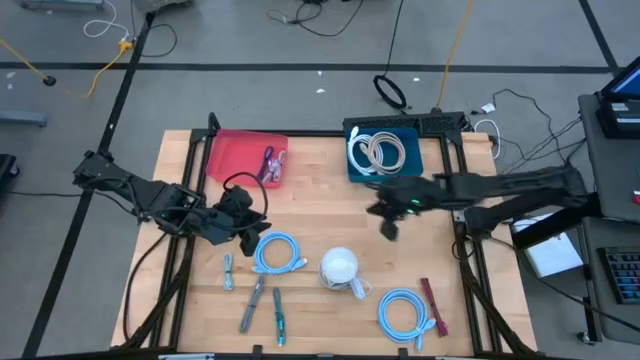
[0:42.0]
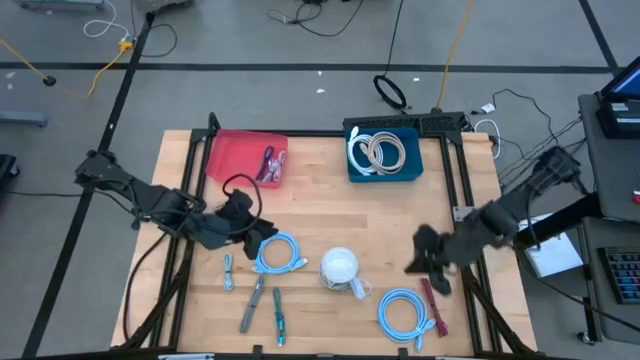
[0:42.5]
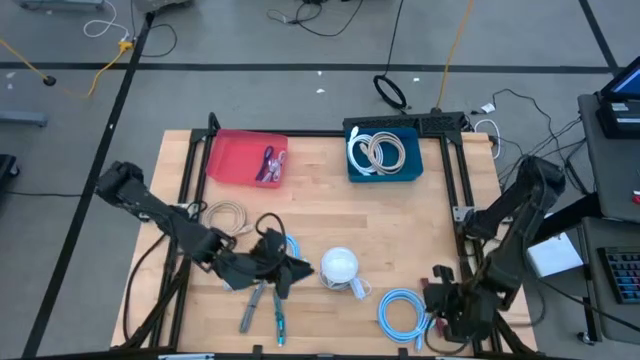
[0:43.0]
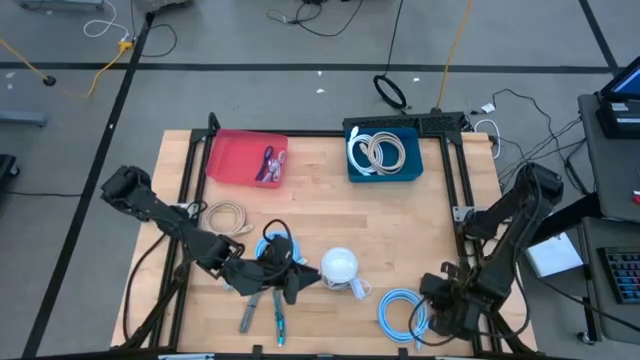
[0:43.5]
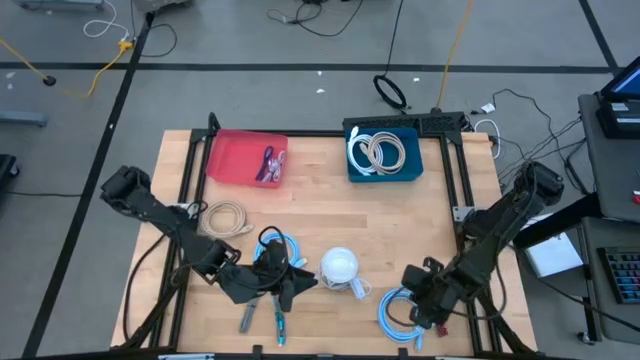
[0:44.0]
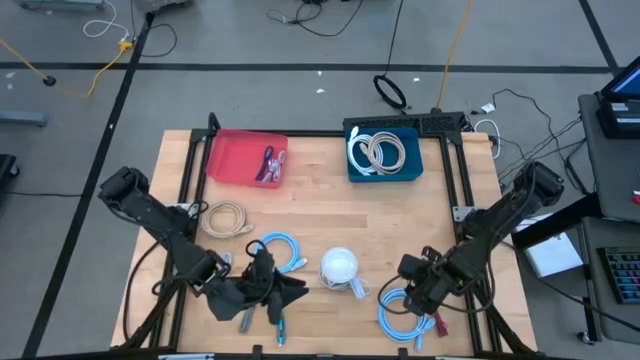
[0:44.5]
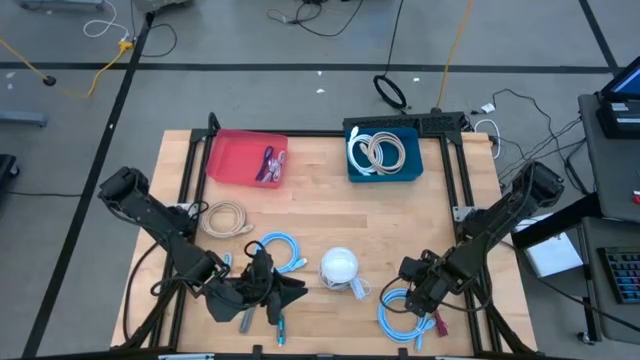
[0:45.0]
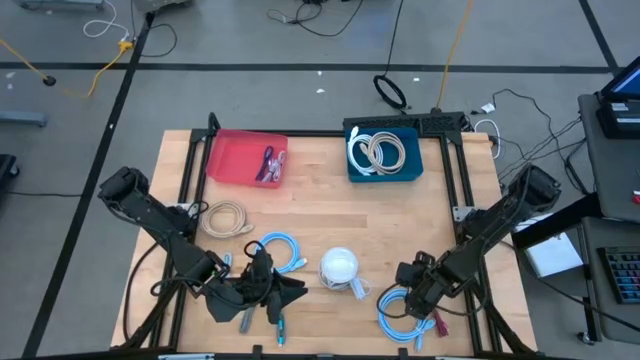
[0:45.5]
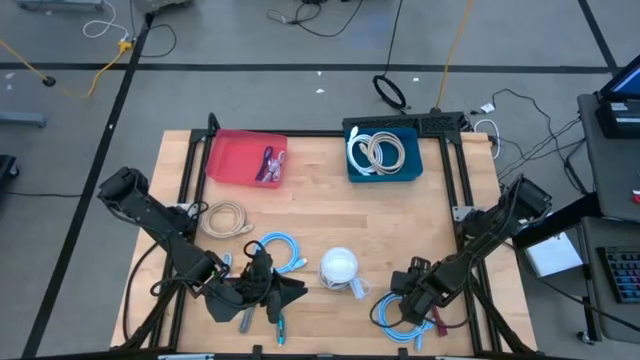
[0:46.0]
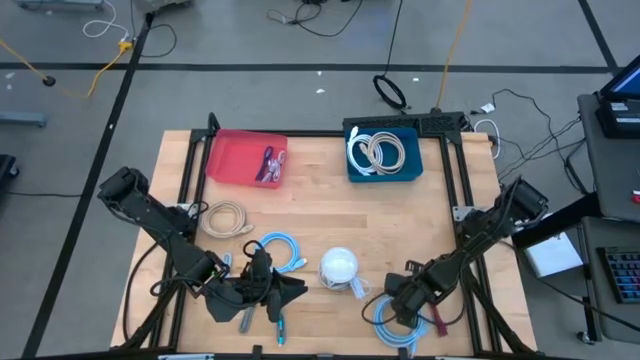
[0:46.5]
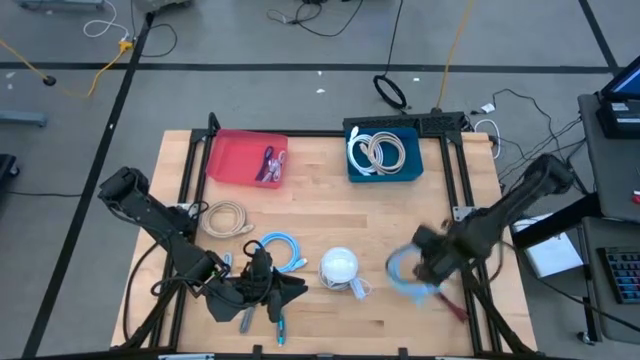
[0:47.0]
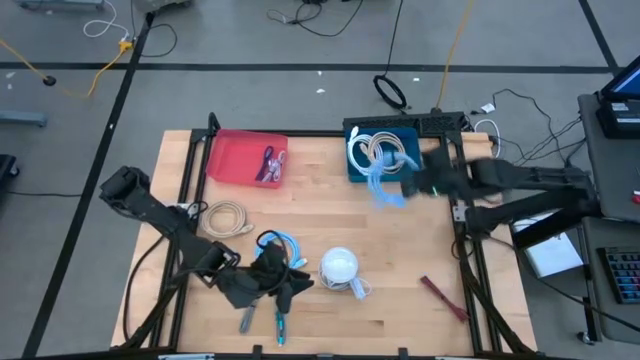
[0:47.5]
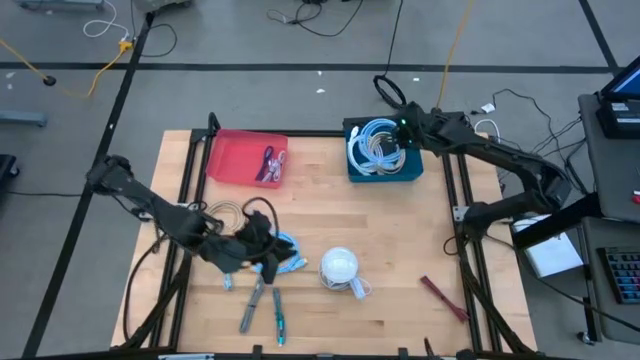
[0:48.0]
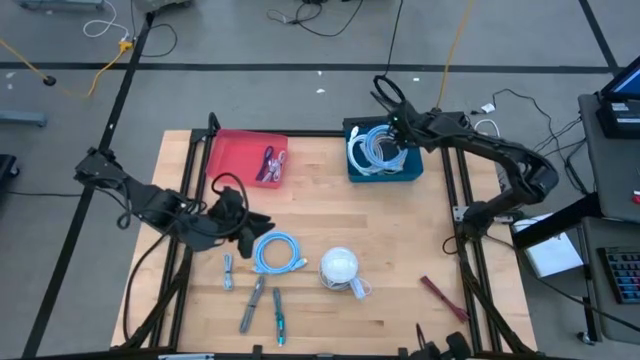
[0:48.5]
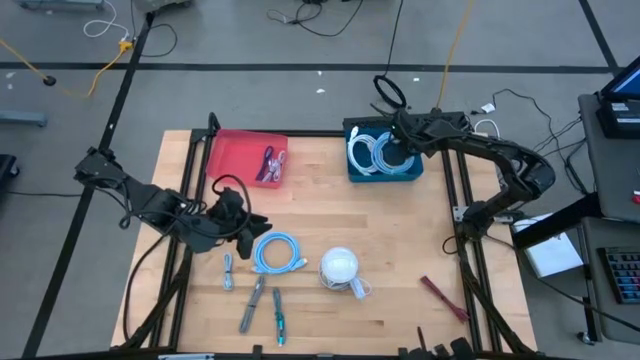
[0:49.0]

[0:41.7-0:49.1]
Task: Pick & Place USB Port
Put the right light blue USB cable into the blue bin

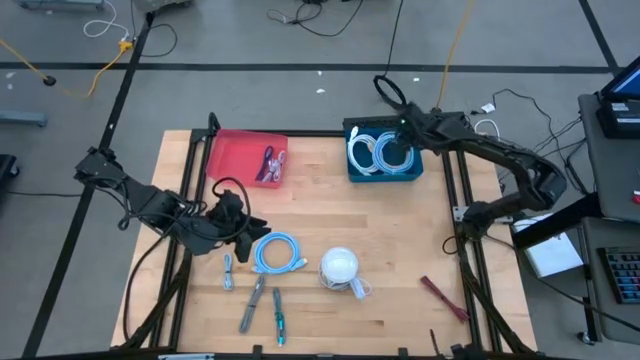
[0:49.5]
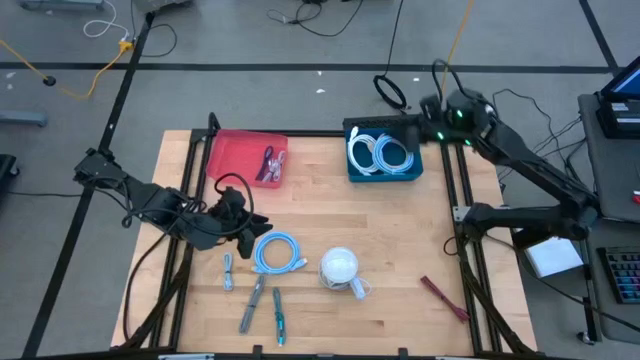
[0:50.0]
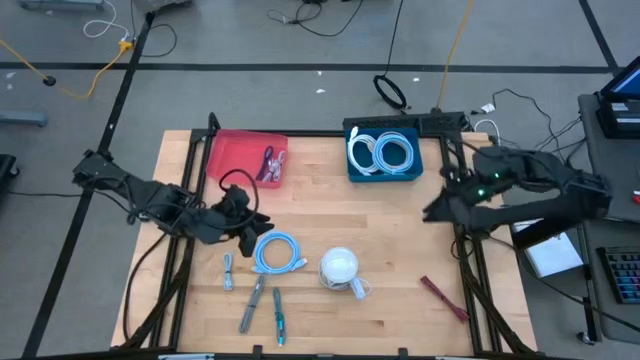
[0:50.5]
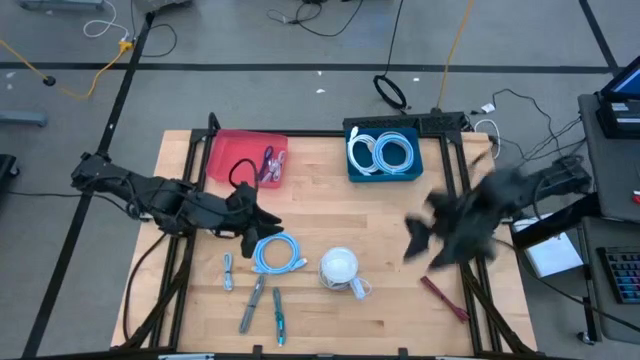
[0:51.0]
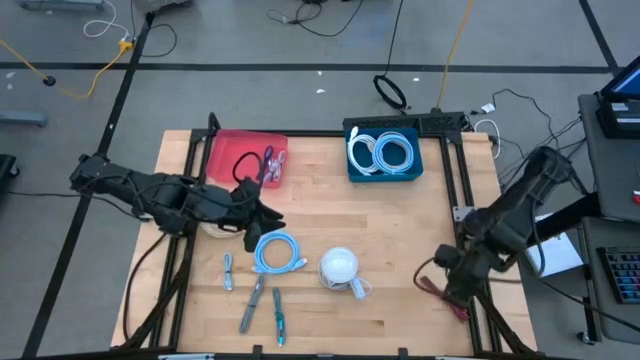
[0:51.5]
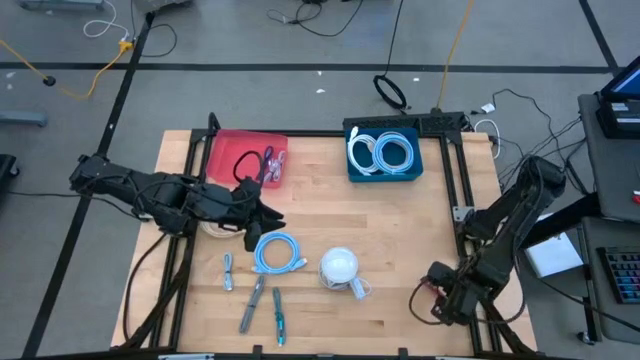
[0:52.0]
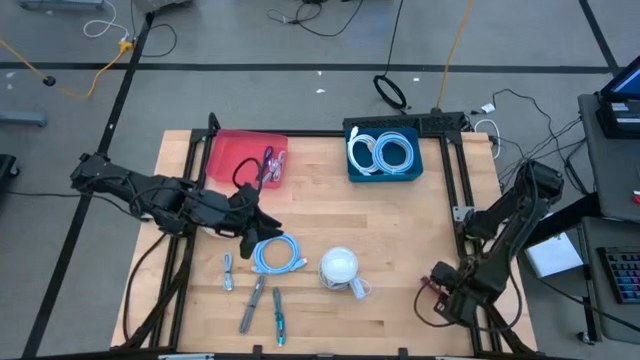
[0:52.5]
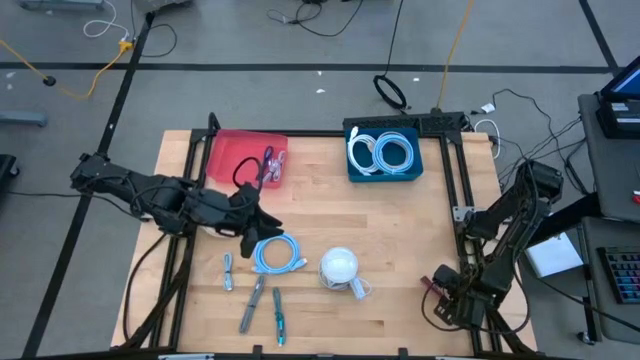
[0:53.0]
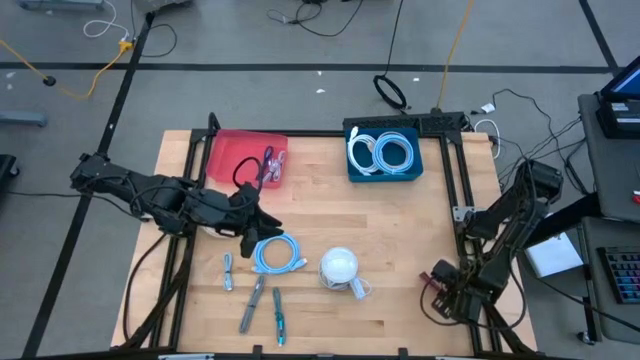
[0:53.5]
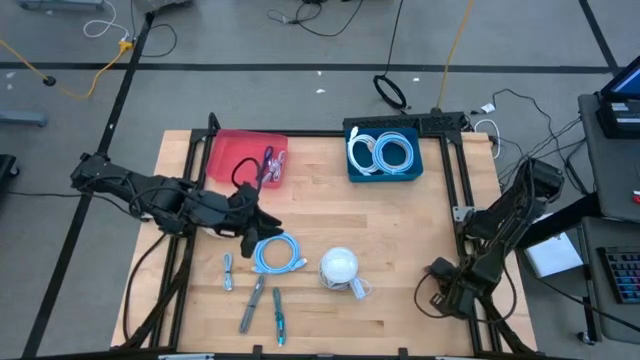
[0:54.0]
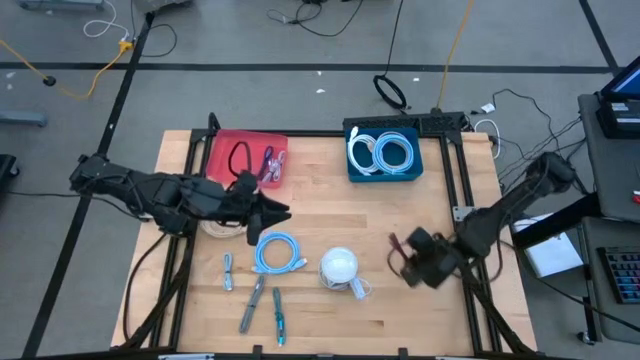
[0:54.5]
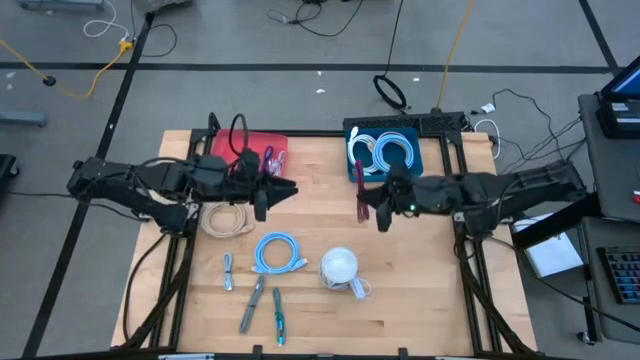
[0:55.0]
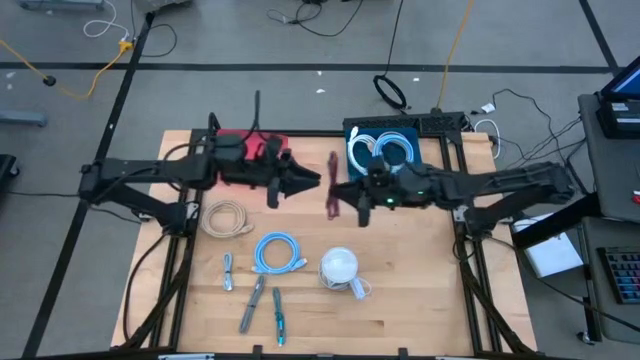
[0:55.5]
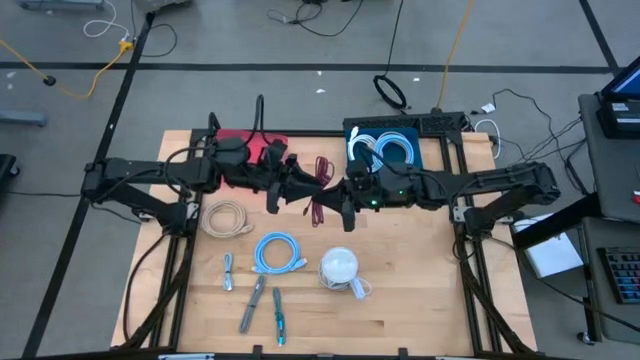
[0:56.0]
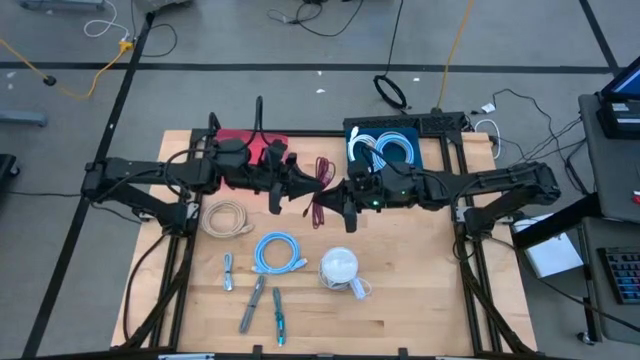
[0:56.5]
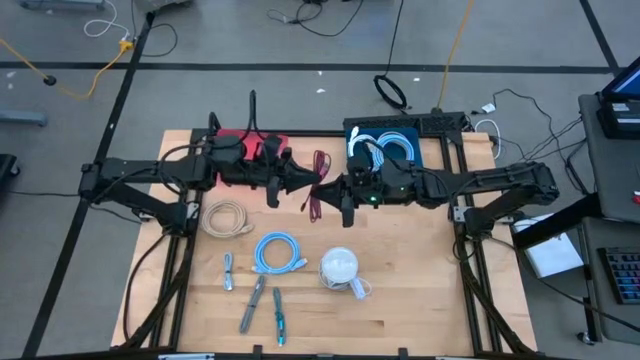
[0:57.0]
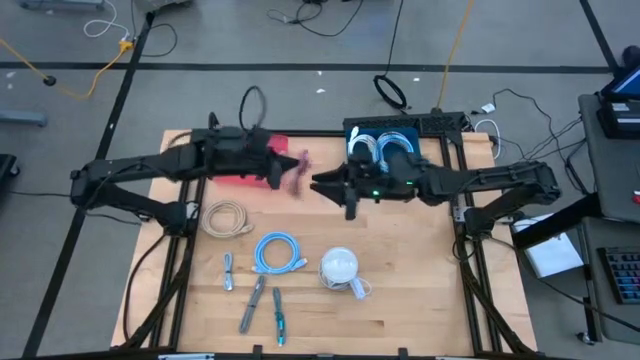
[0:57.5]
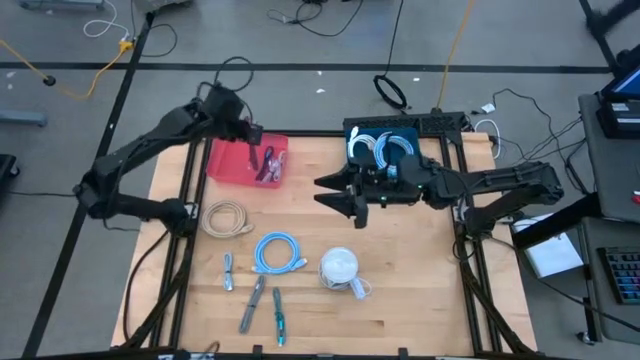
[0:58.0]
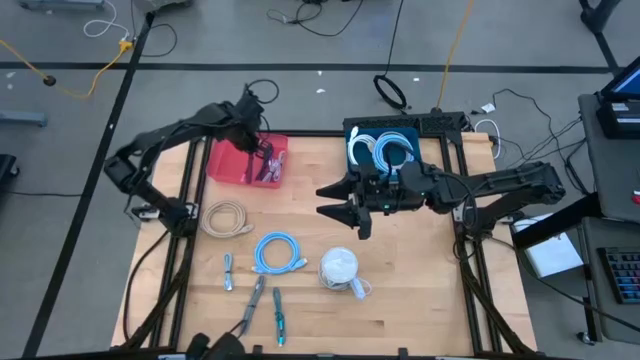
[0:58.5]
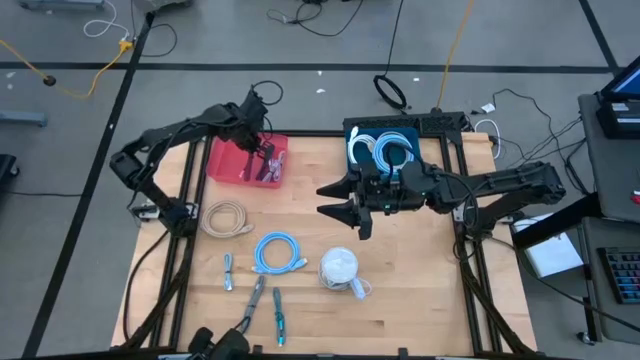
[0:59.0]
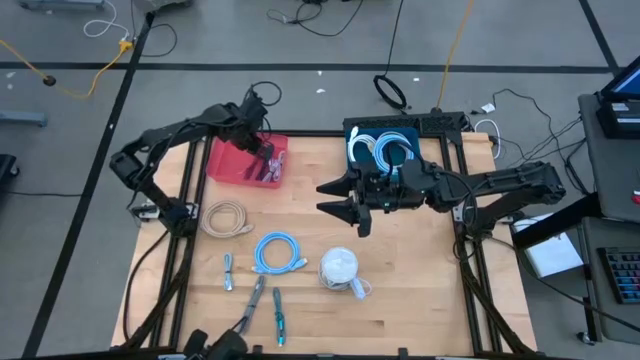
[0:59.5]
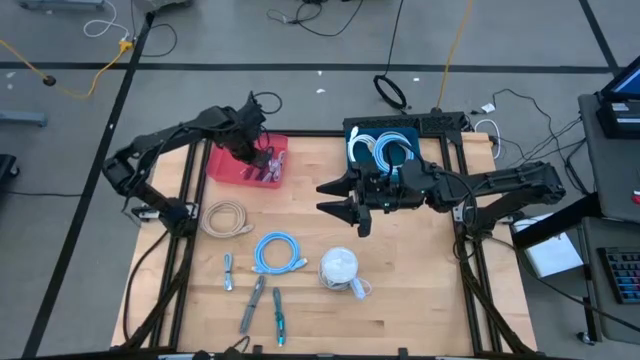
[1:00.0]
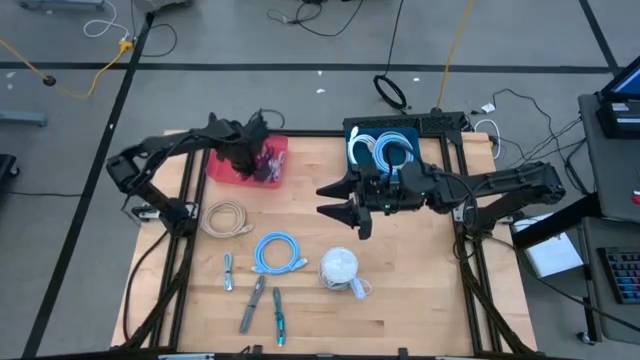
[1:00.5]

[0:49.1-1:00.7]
Put the pink USB cable into the pink bin

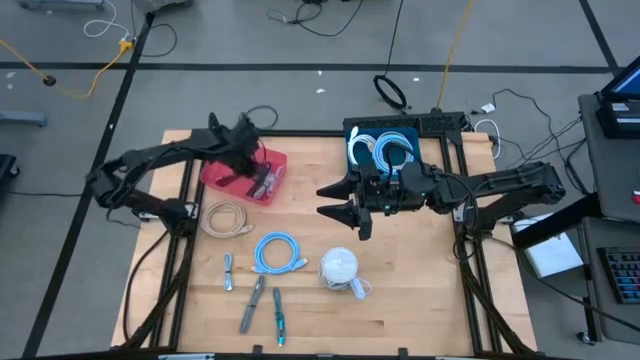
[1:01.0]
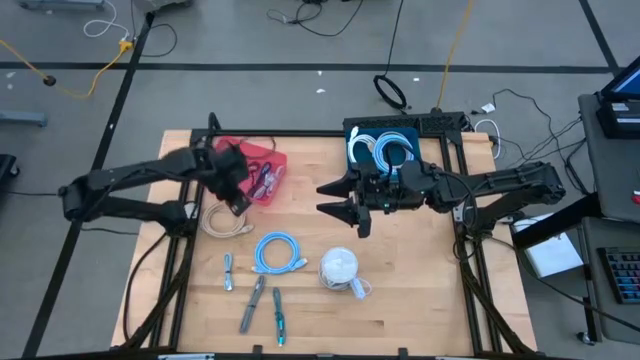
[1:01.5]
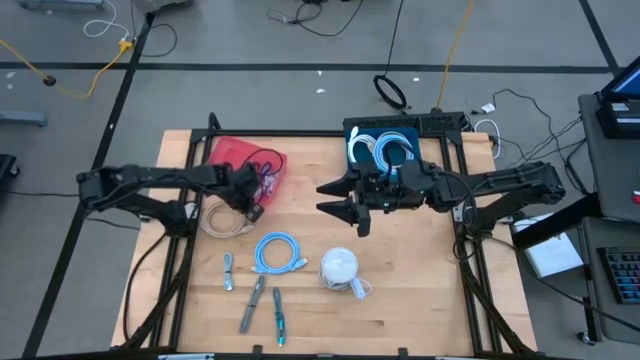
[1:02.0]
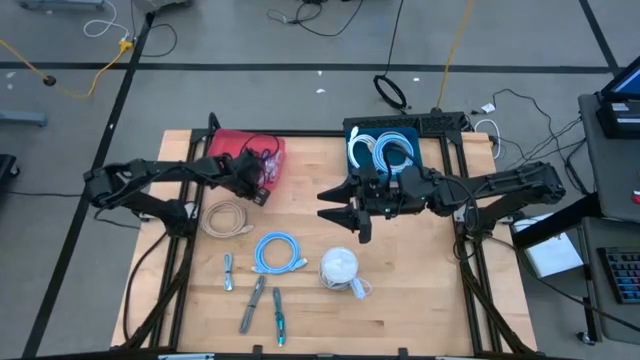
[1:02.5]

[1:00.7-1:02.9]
Adjust the pink bin

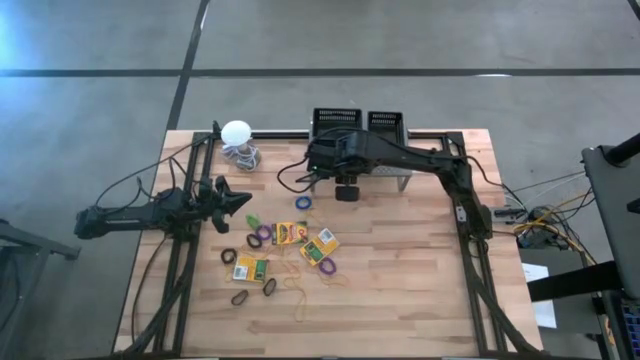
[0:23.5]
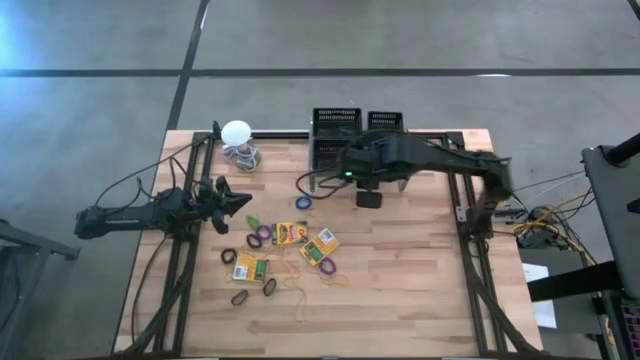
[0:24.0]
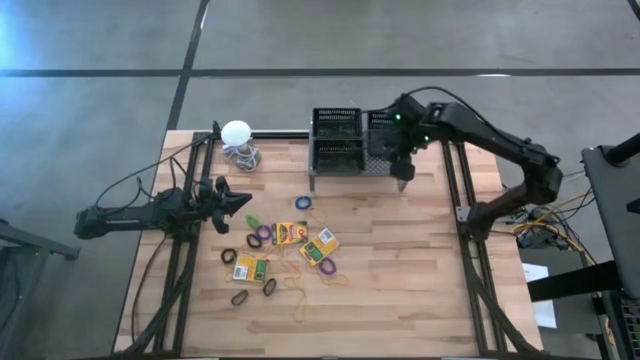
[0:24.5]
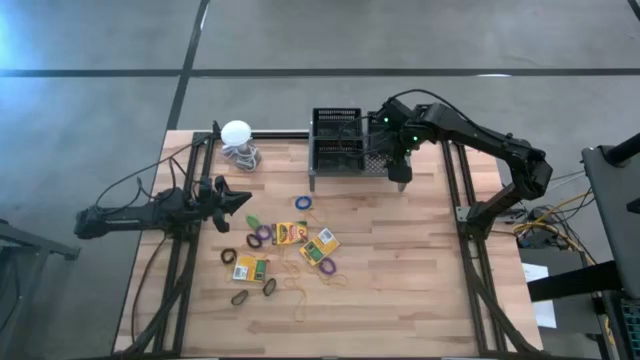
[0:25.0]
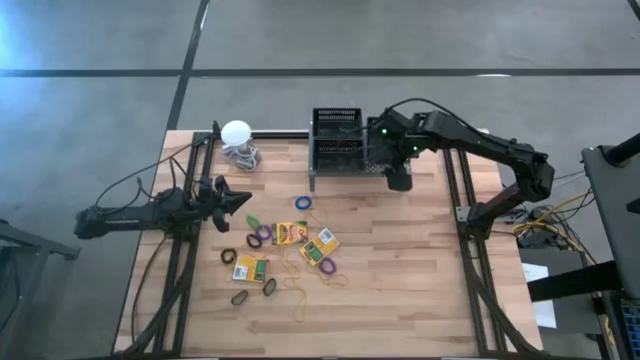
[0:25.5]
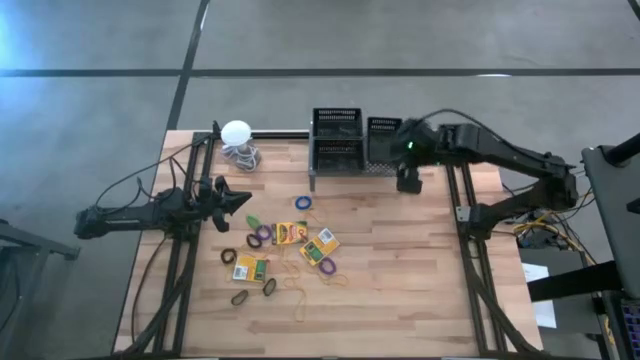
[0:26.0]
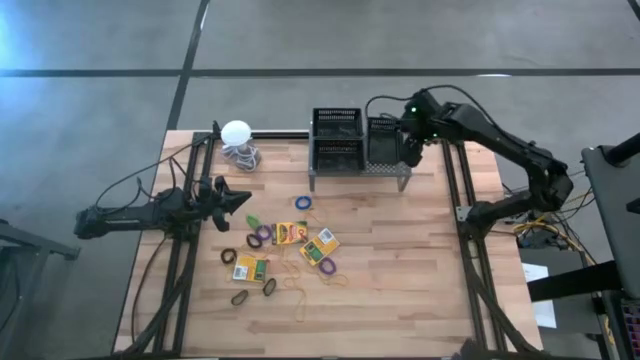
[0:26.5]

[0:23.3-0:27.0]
Task: Pick & Place Office Desk Supplies
Adjust the right black bin on the shelf
